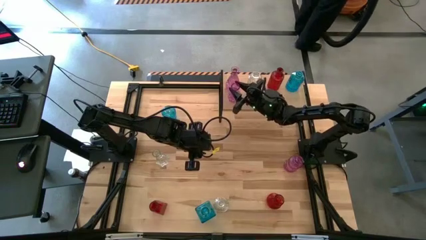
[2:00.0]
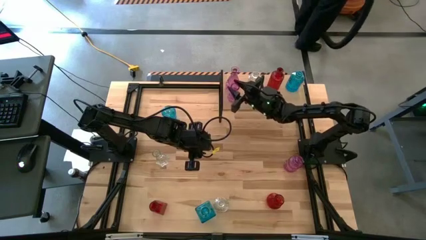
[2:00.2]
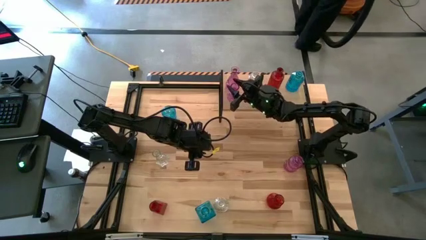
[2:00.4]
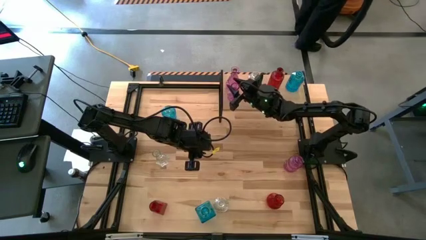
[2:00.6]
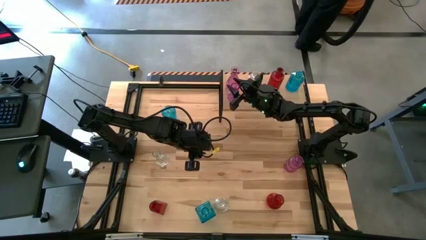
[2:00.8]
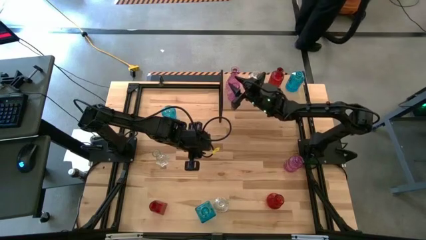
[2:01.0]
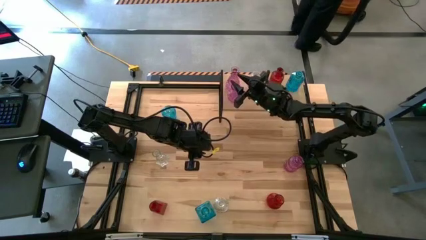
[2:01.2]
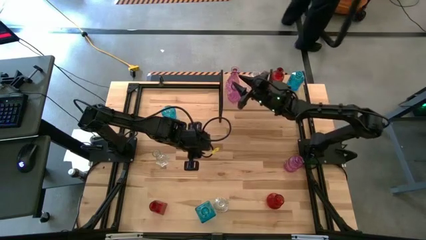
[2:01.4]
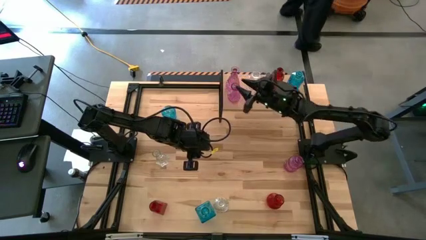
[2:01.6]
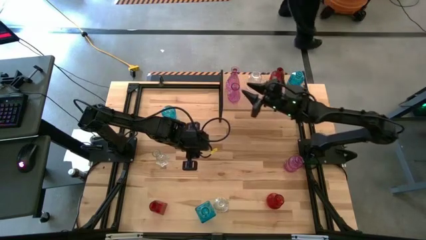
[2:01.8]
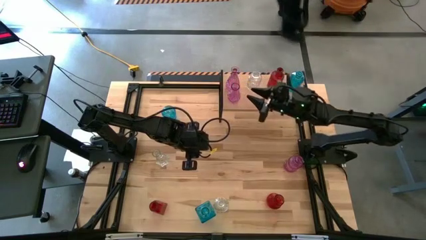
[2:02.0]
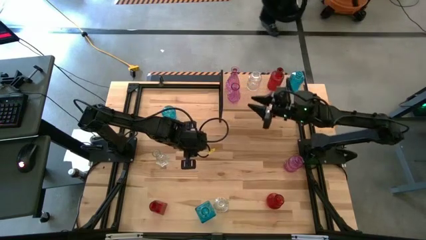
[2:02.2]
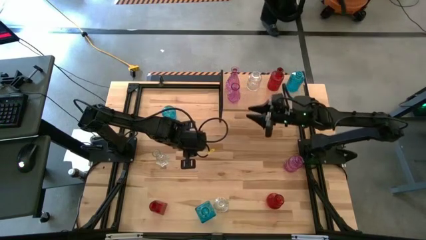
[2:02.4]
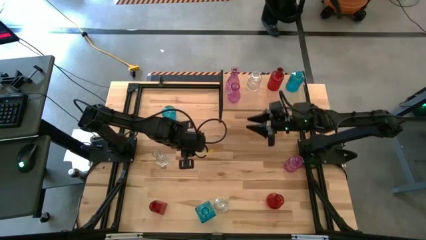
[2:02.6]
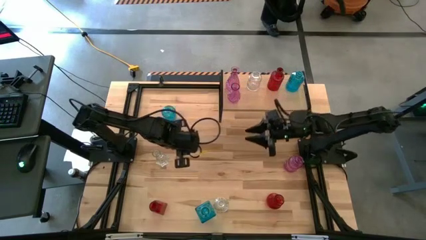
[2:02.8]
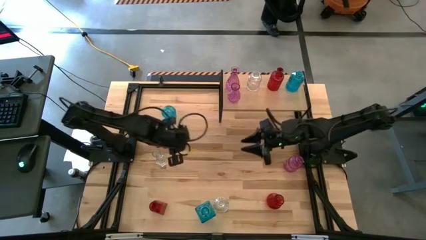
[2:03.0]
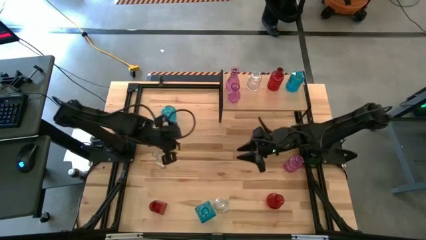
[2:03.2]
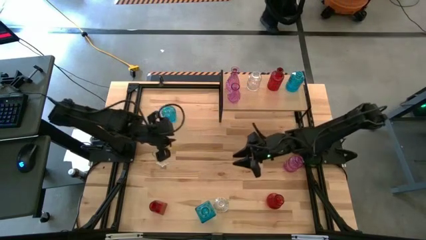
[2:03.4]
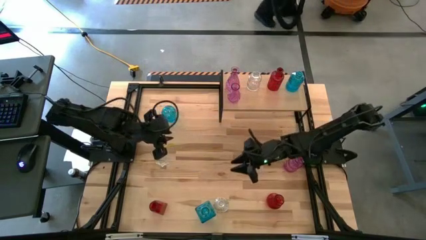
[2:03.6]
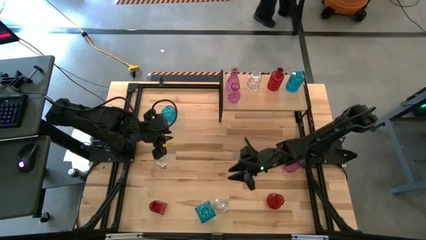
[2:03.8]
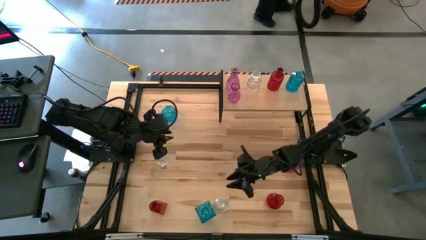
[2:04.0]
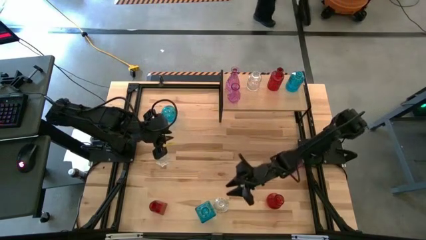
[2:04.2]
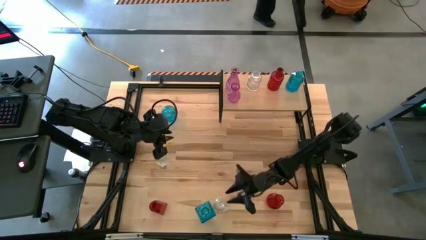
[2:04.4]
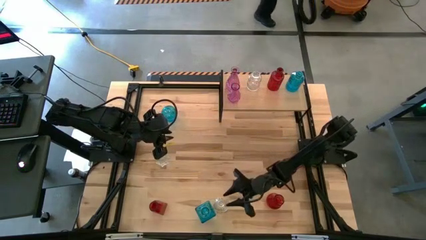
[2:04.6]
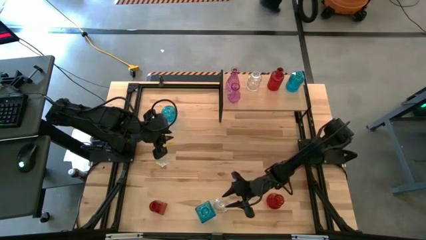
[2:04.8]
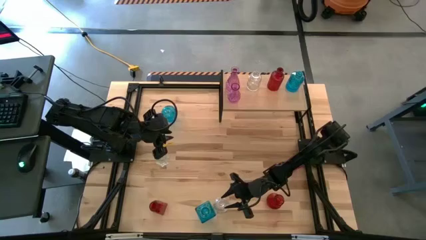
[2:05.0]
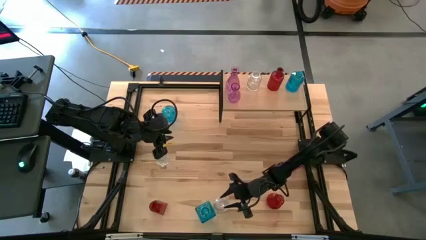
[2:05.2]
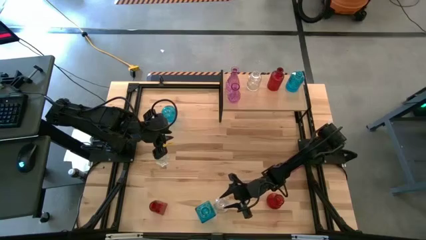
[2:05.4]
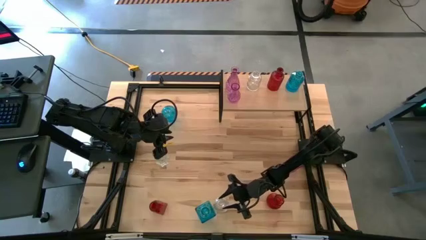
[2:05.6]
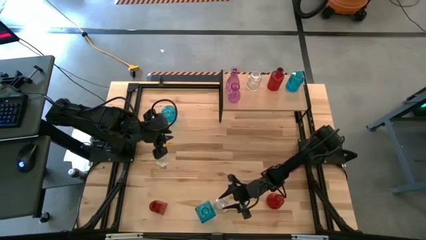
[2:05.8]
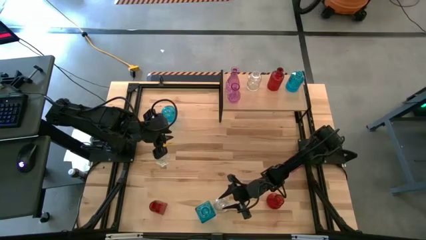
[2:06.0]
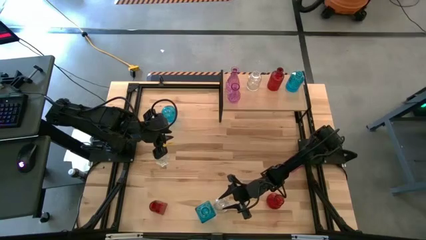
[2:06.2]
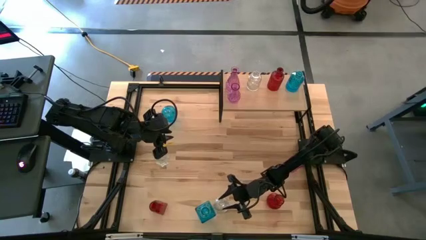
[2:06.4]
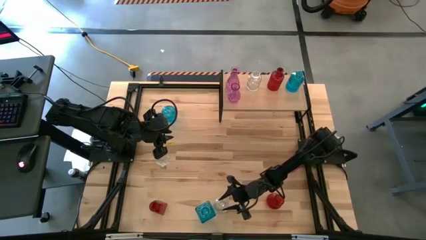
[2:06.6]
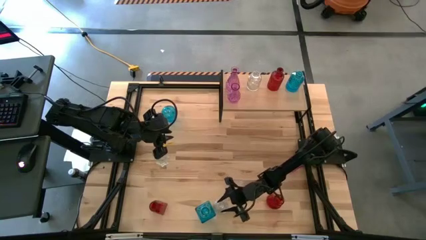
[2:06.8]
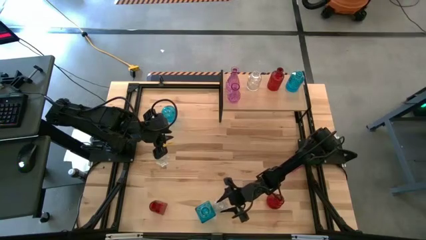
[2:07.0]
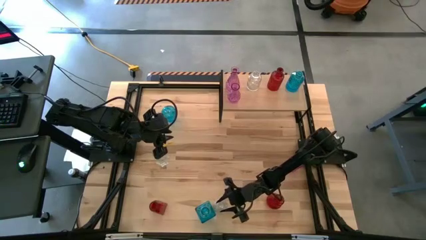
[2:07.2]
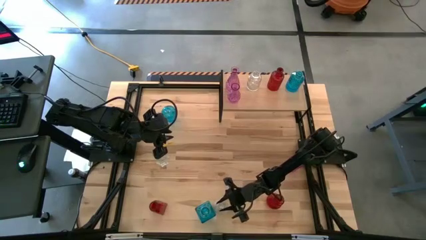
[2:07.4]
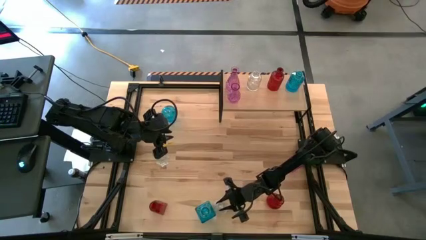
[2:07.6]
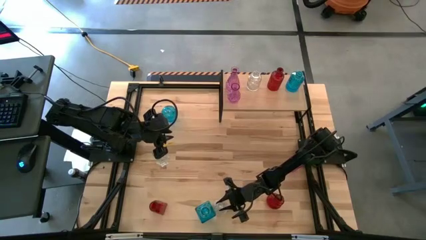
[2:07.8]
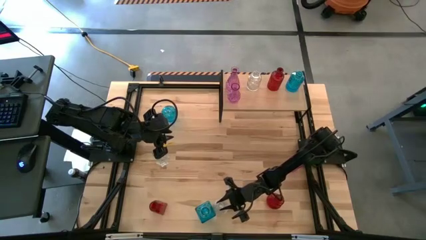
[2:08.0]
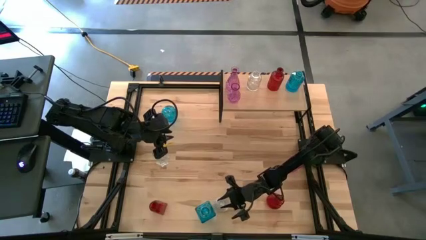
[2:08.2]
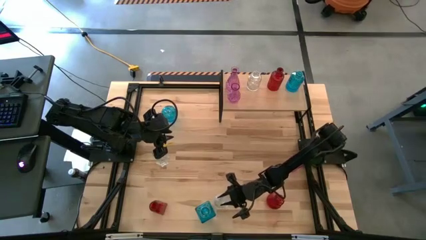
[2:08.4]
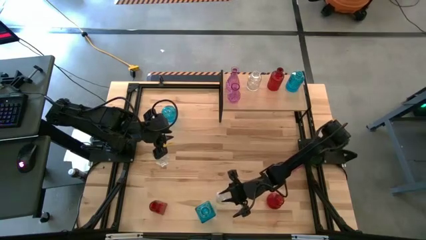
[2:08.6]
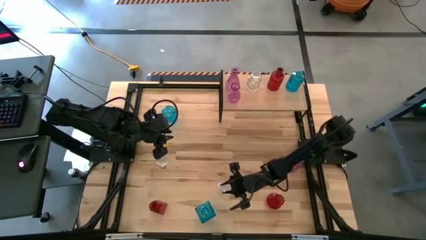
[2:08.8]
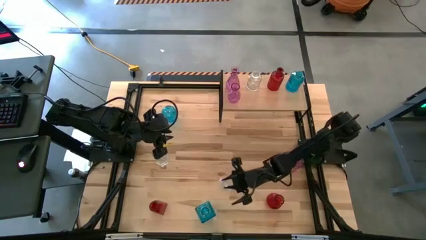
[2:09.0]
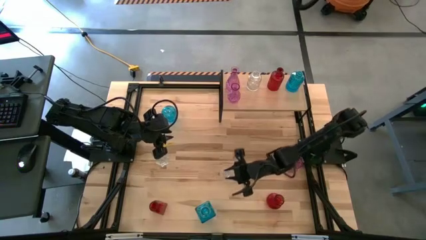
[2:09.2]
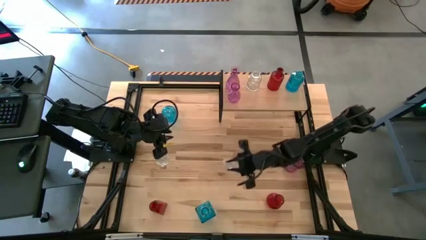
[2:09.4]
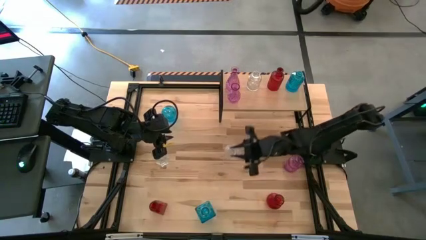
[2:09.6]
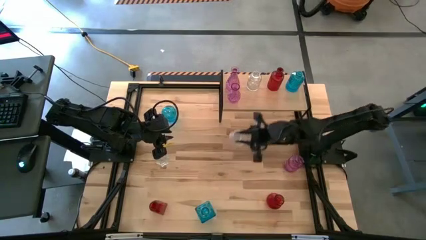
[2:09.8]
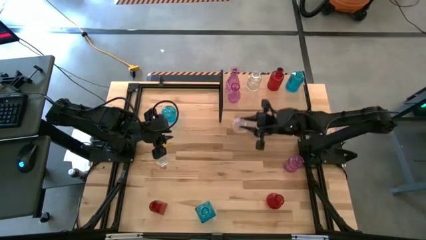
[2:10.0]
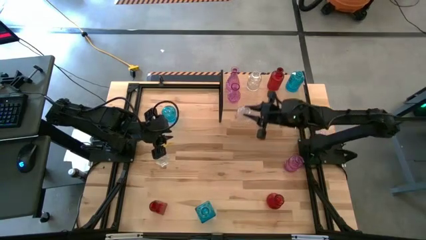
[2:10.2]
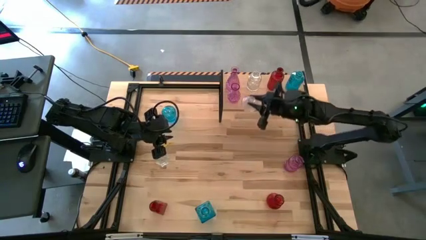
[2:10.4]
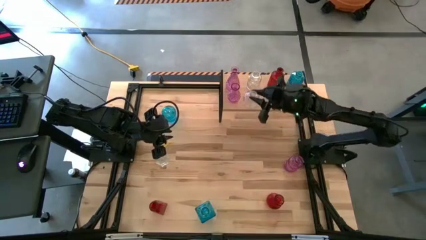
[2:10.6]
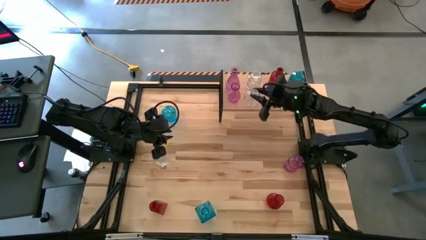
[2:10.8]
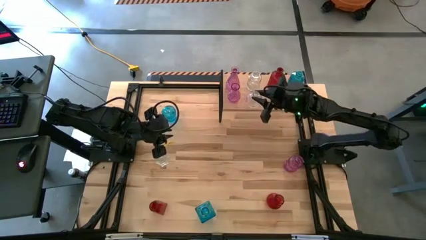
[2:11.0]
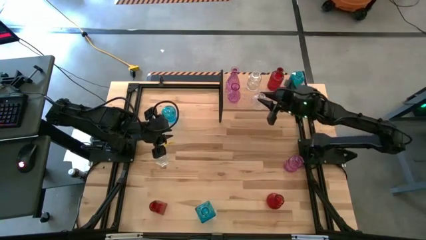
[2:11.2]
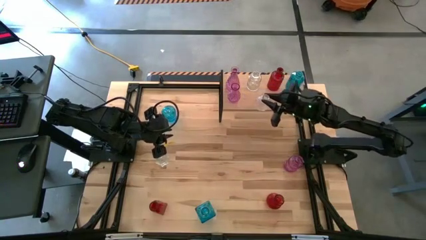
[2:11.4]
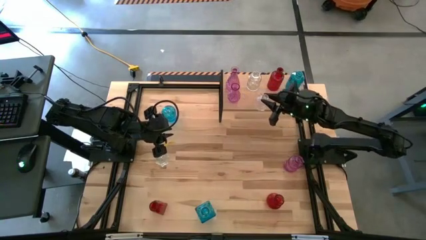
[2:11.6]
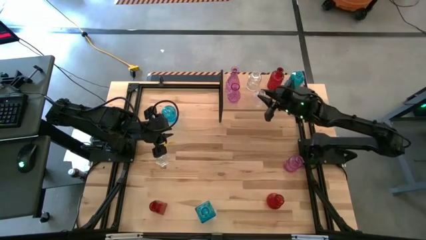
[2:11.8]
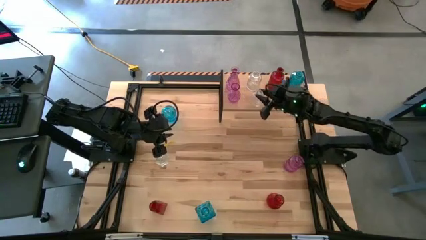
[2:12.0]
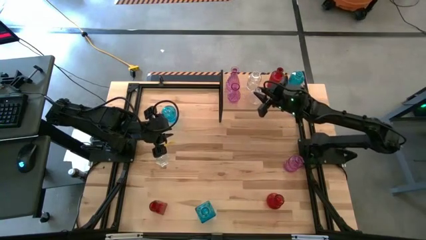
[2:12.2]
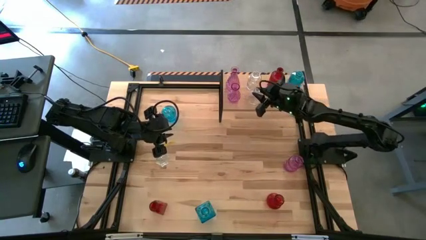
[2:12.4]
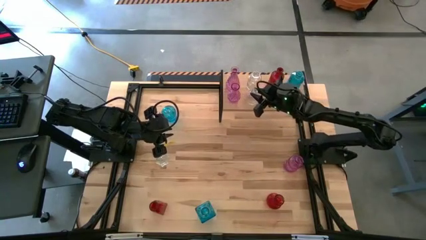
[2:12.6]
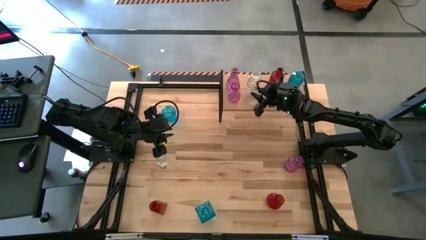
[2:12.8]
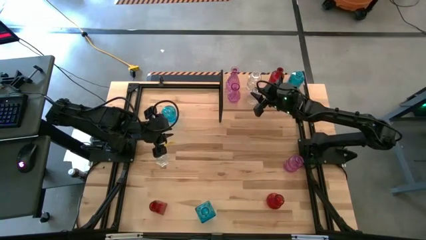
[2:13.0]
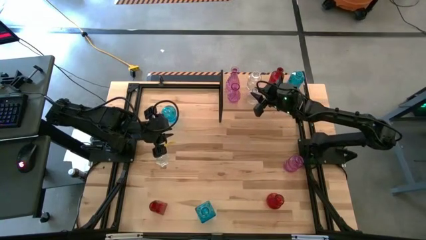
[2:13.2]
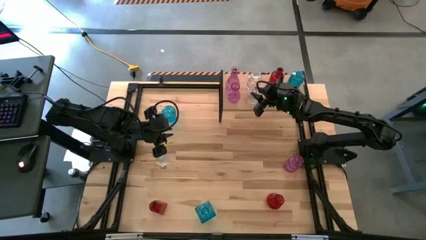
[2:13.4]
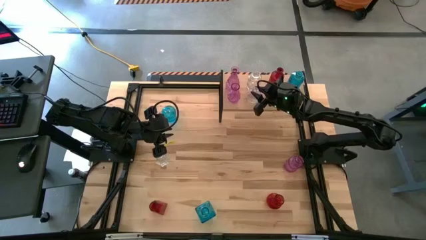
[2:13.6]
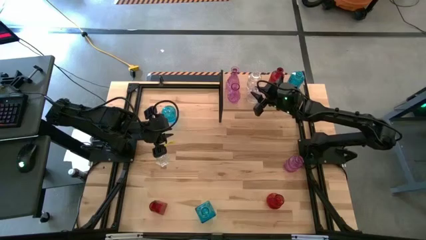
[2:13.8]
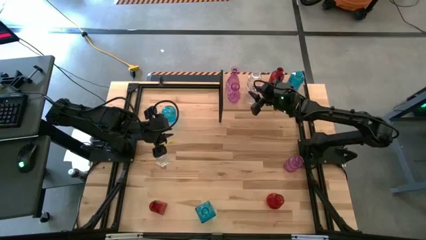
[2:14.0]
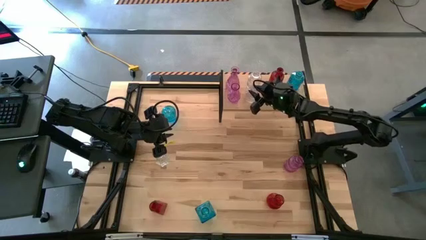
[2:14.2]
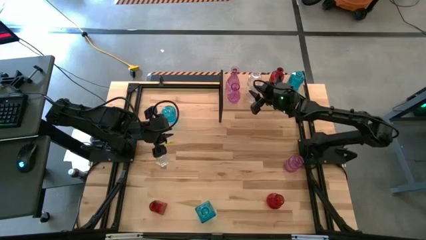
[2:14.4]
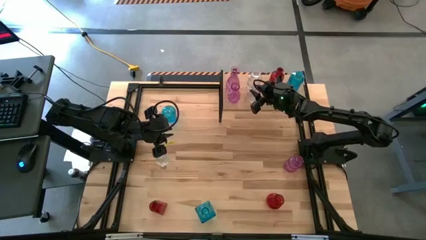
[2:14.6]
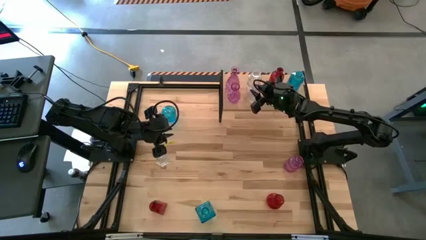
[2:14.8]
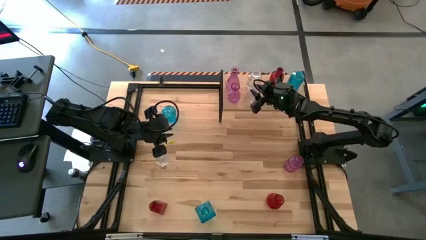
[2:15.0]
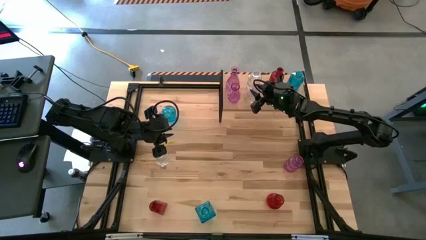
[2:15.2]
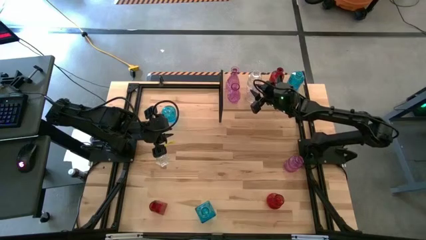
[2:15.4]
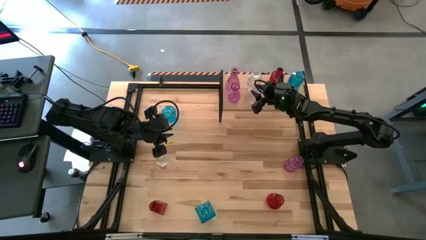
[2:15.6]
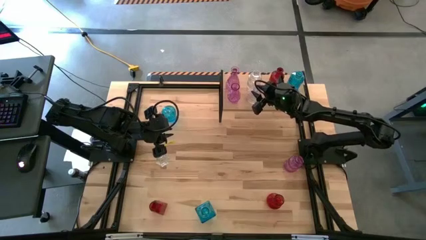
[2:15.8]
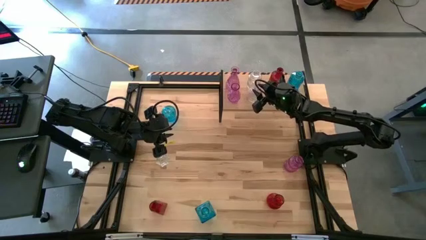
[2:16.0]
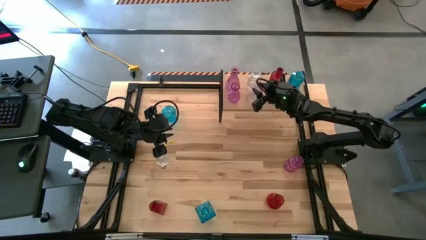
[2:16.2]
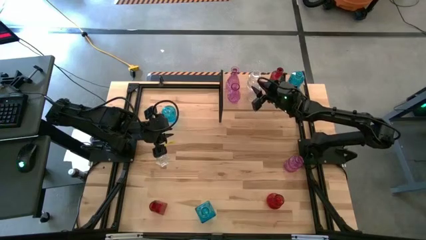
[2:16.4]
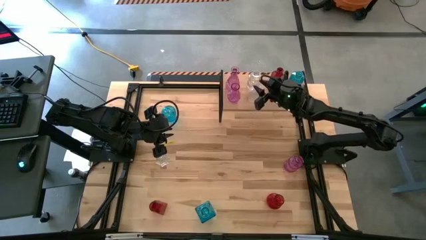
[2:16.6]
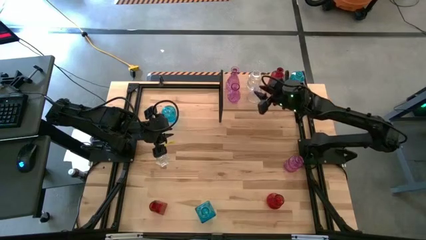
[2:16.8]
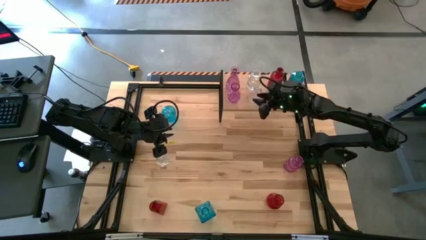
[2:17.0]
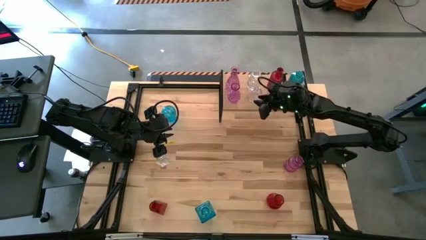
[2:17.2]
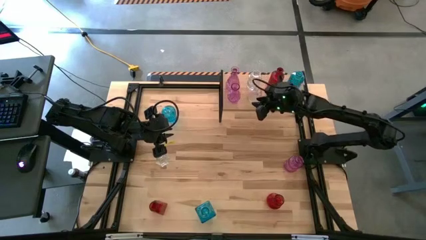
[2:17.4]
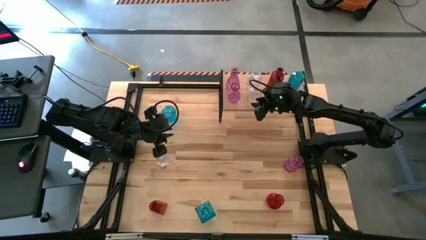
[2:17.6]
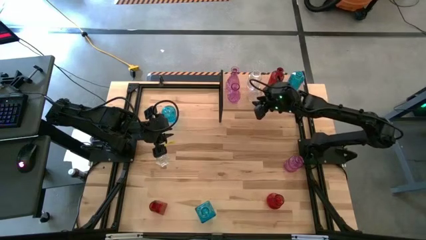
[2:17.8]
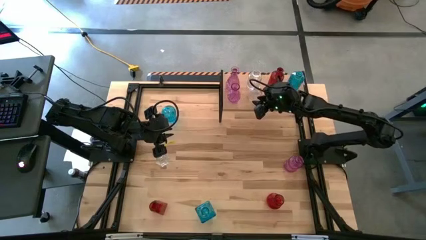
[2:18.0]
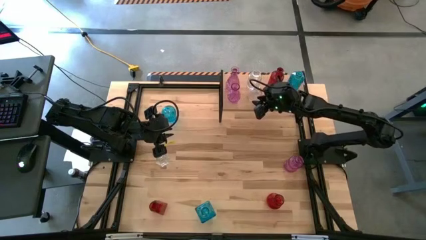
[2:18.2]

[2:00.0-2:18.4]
Task: sort vases onto shelf
Put the bottom transparent vase on the shelf aligned with the other transparent vase
